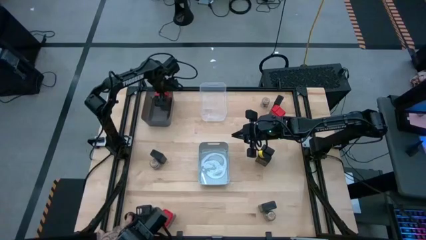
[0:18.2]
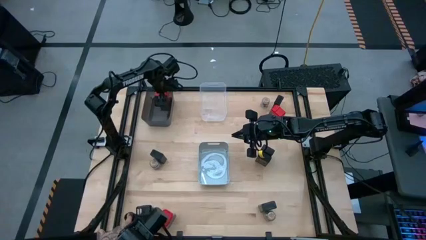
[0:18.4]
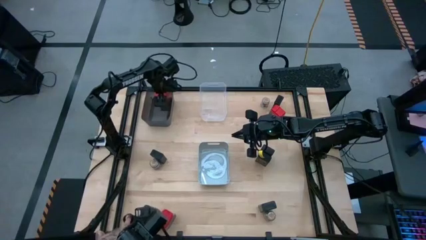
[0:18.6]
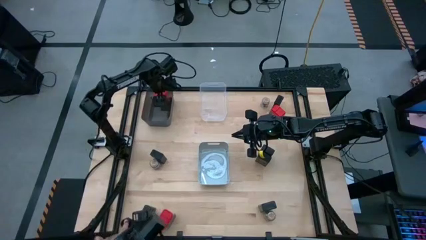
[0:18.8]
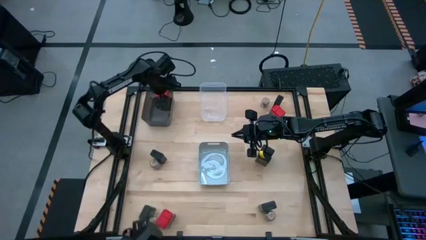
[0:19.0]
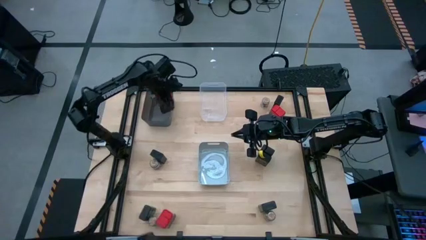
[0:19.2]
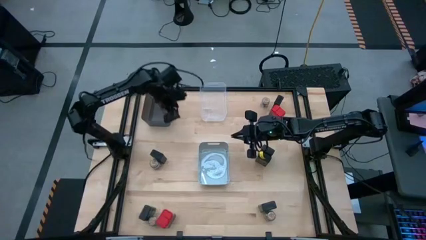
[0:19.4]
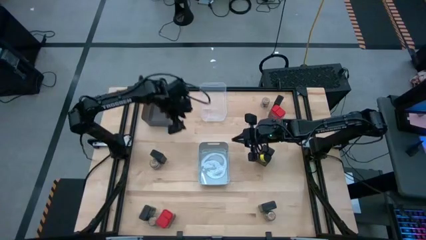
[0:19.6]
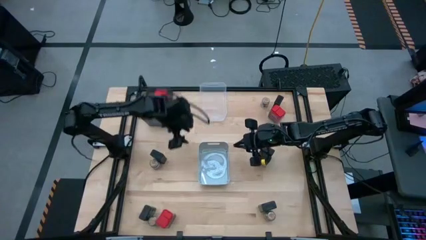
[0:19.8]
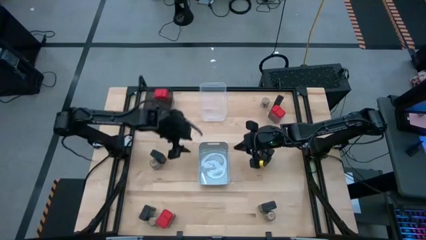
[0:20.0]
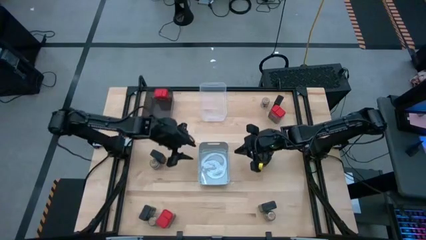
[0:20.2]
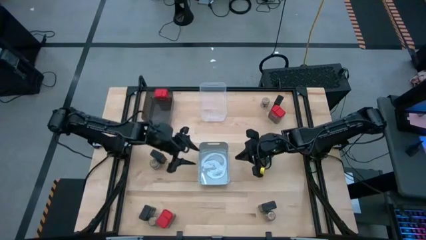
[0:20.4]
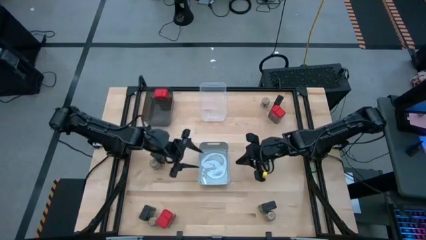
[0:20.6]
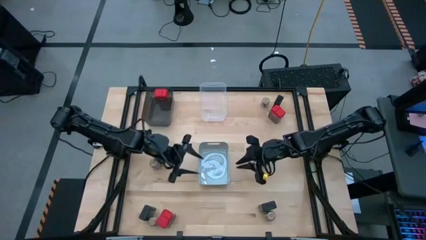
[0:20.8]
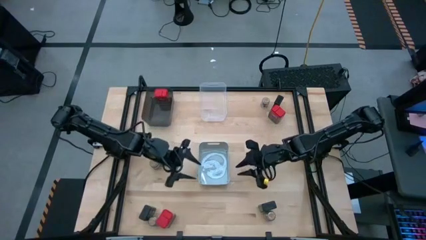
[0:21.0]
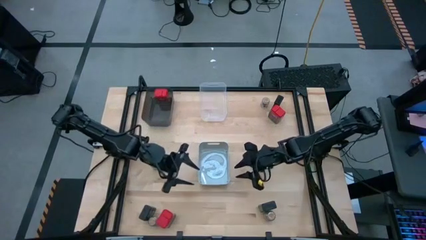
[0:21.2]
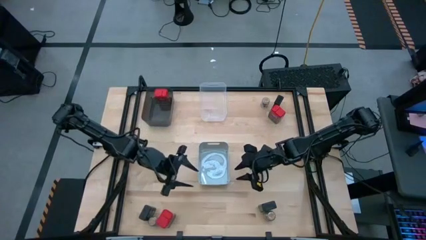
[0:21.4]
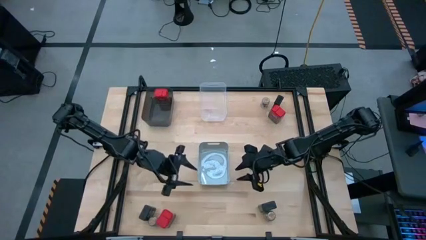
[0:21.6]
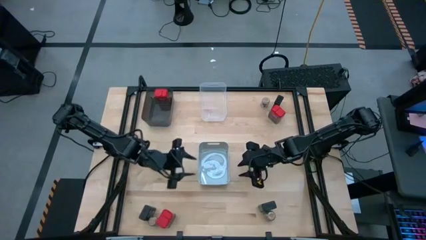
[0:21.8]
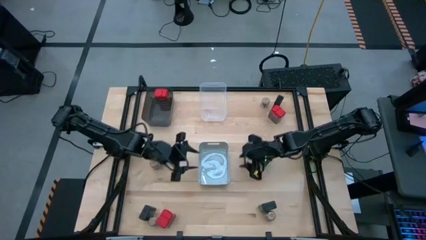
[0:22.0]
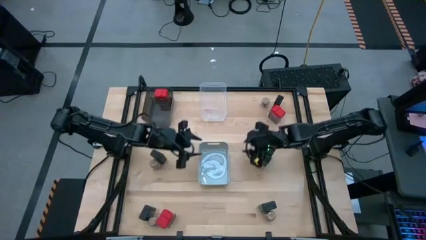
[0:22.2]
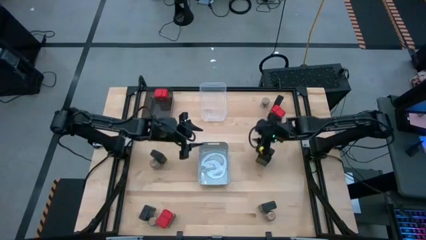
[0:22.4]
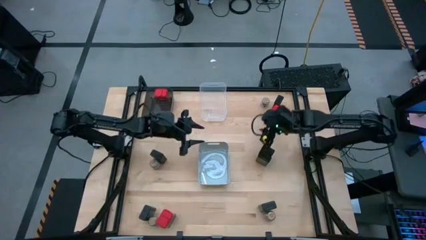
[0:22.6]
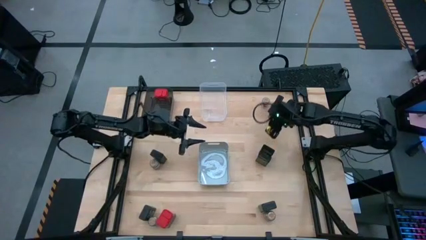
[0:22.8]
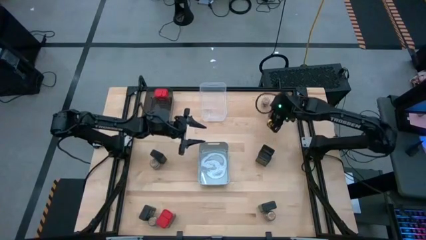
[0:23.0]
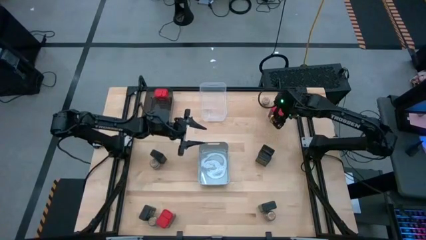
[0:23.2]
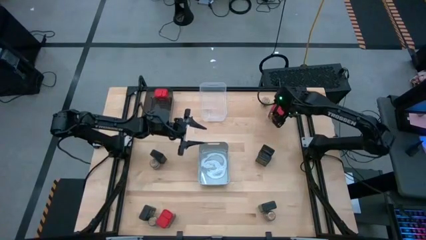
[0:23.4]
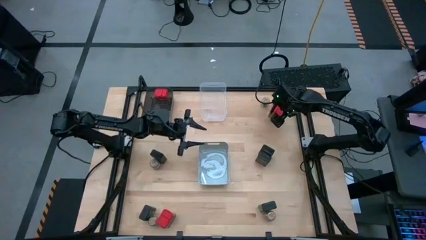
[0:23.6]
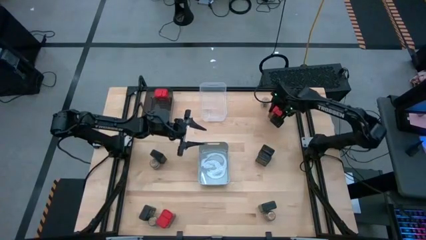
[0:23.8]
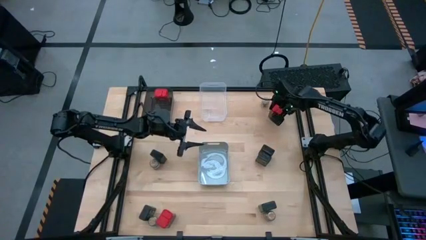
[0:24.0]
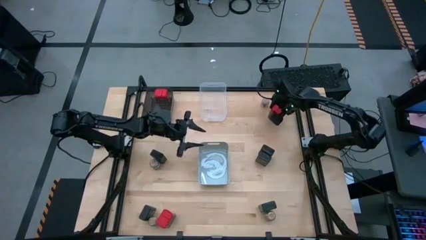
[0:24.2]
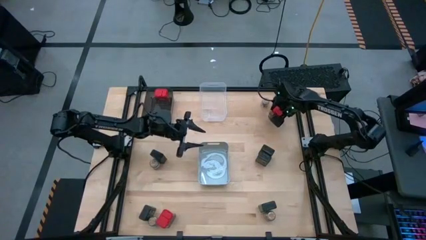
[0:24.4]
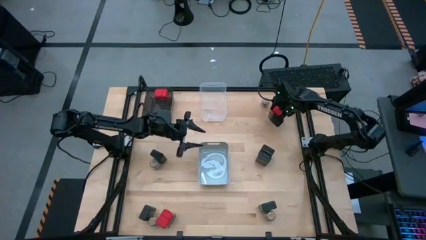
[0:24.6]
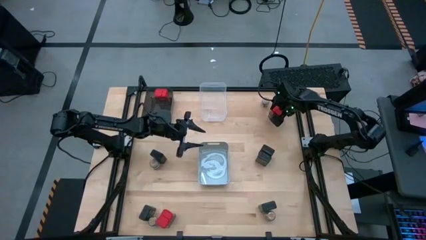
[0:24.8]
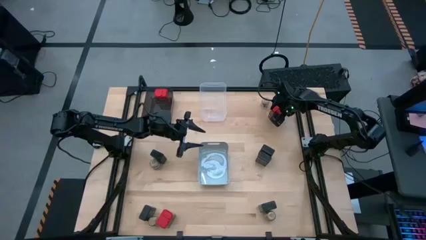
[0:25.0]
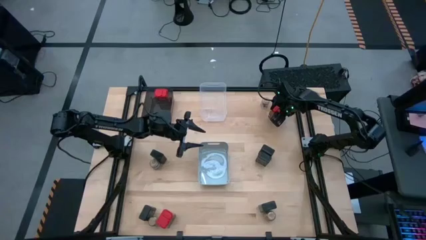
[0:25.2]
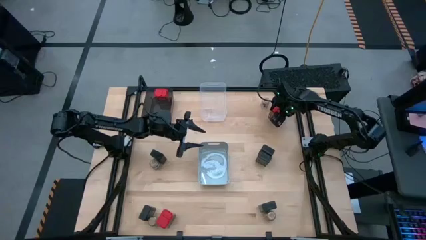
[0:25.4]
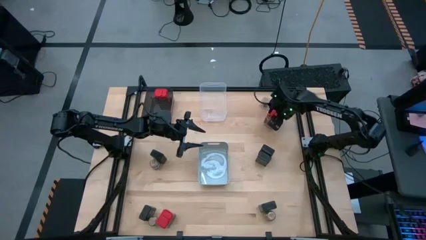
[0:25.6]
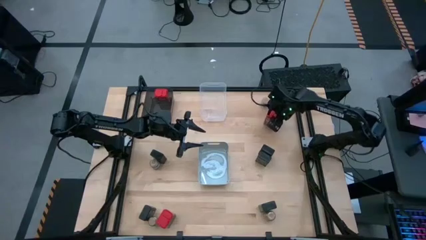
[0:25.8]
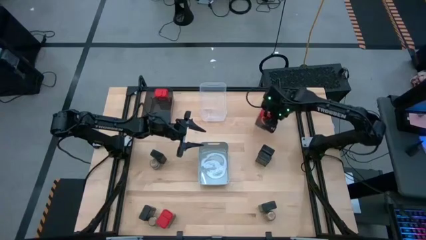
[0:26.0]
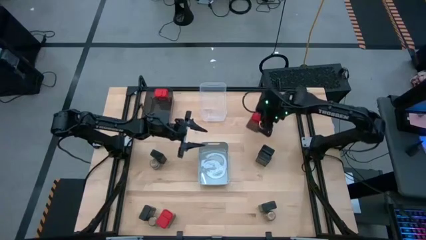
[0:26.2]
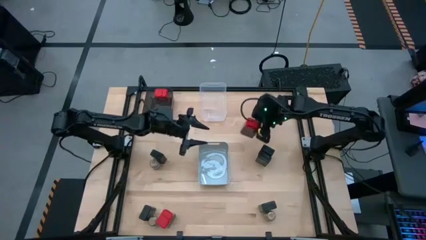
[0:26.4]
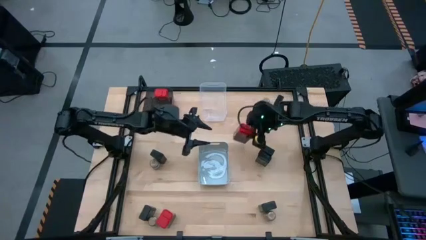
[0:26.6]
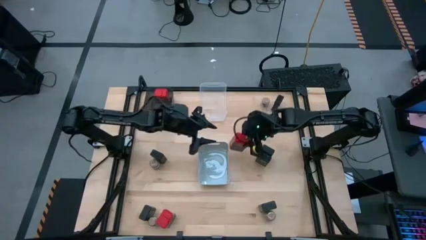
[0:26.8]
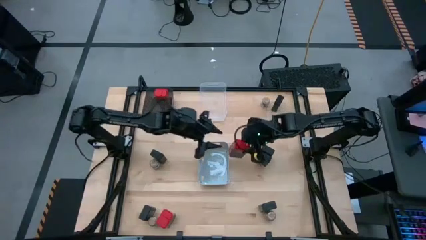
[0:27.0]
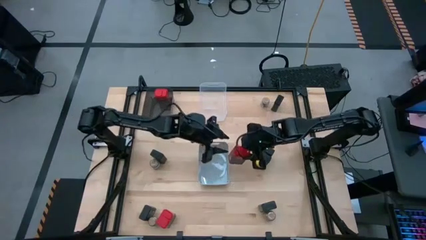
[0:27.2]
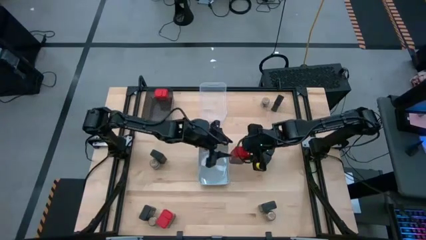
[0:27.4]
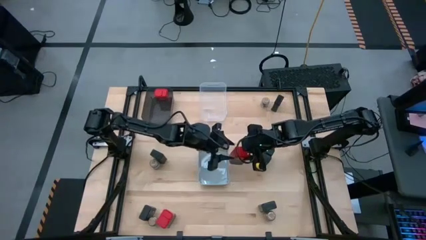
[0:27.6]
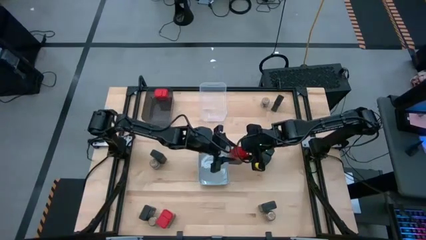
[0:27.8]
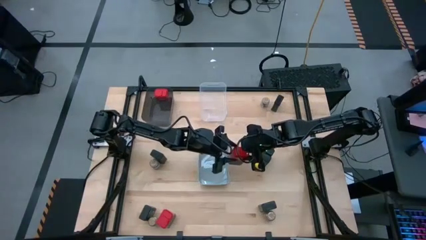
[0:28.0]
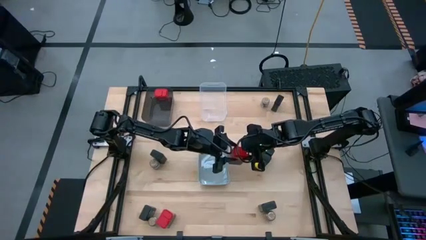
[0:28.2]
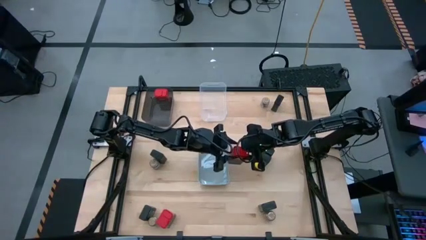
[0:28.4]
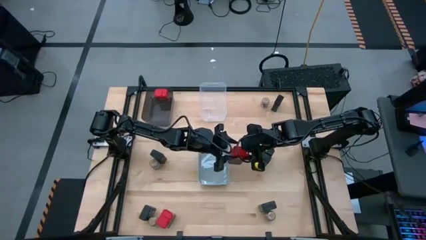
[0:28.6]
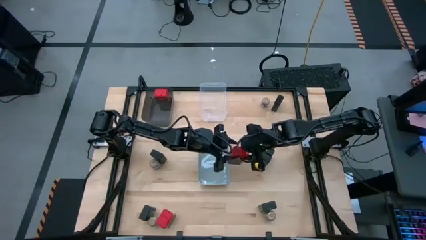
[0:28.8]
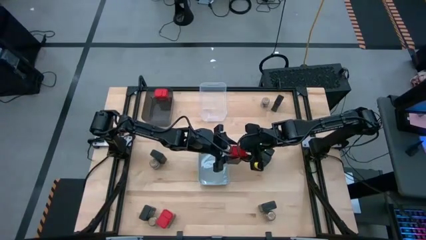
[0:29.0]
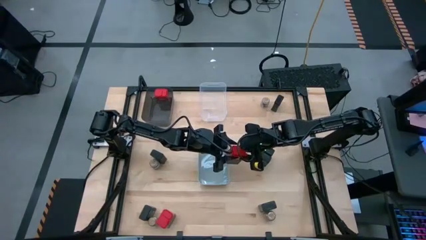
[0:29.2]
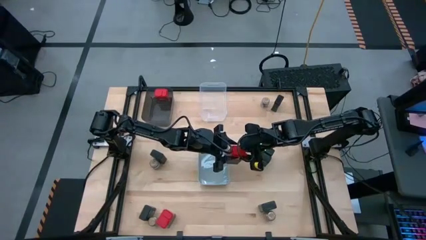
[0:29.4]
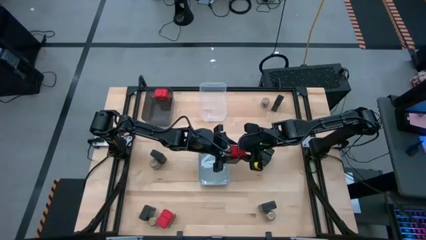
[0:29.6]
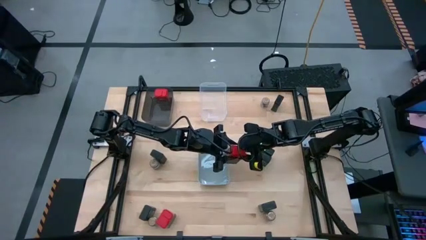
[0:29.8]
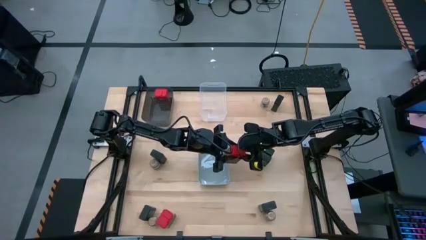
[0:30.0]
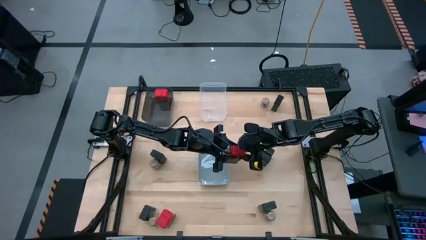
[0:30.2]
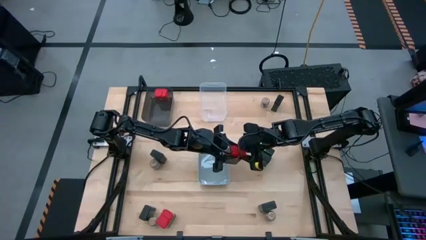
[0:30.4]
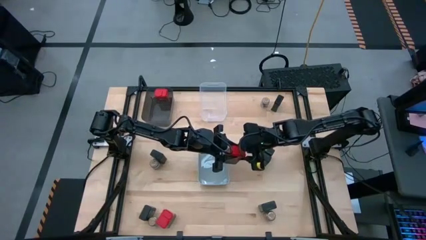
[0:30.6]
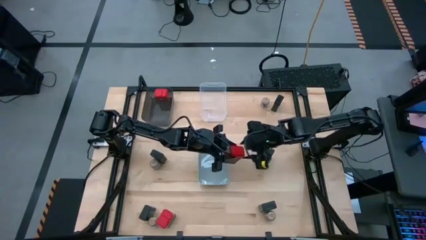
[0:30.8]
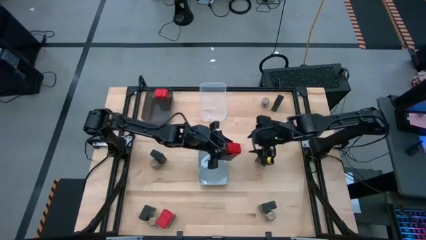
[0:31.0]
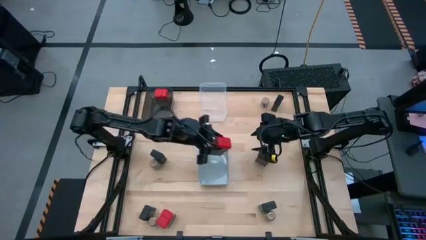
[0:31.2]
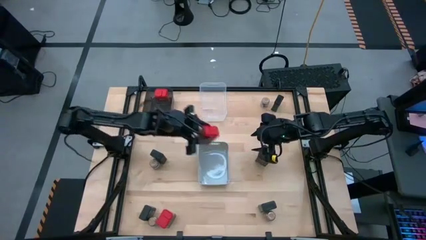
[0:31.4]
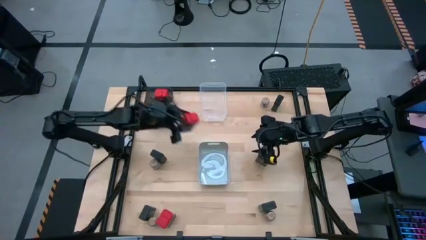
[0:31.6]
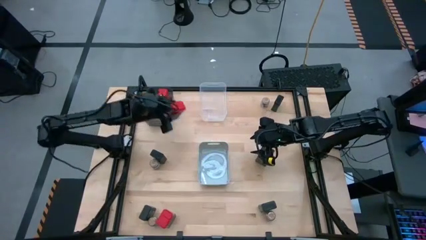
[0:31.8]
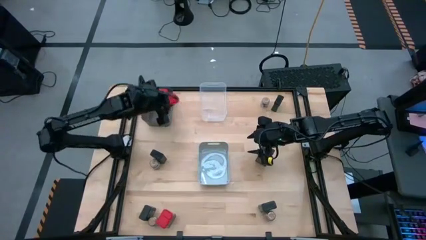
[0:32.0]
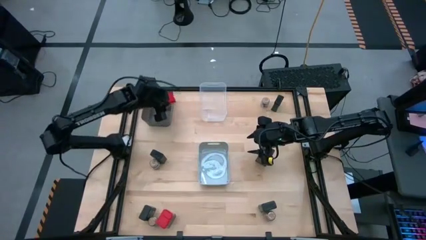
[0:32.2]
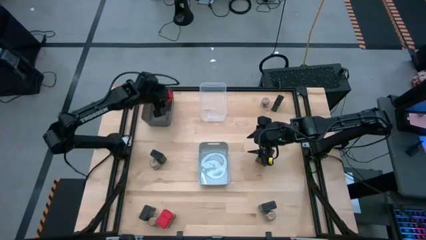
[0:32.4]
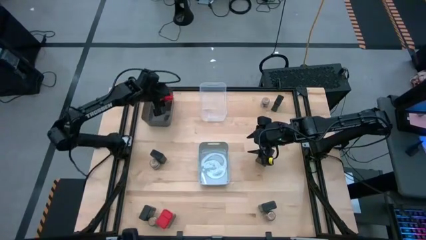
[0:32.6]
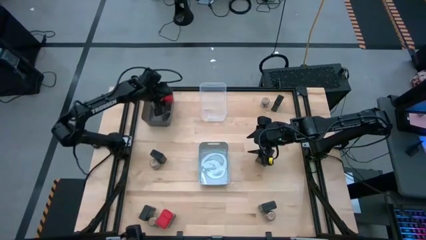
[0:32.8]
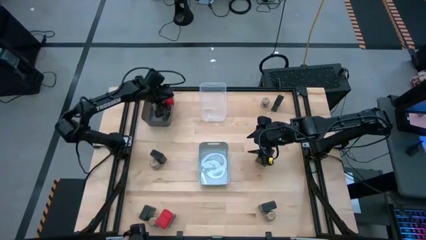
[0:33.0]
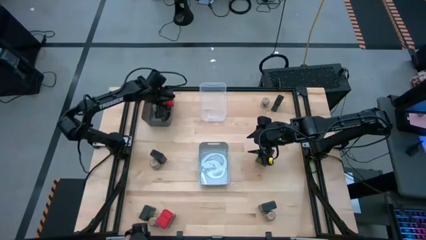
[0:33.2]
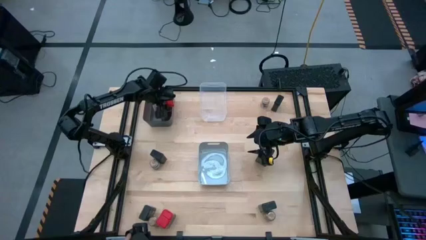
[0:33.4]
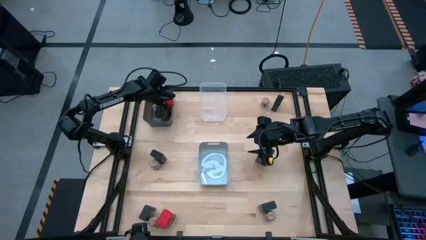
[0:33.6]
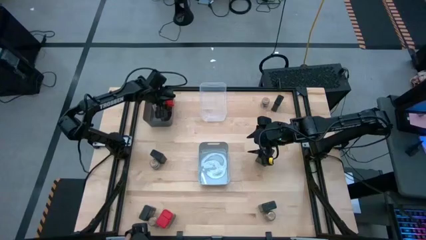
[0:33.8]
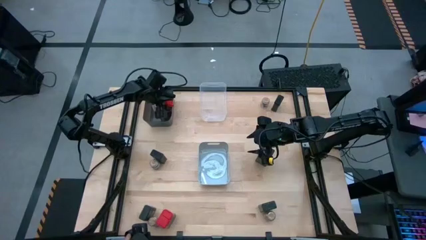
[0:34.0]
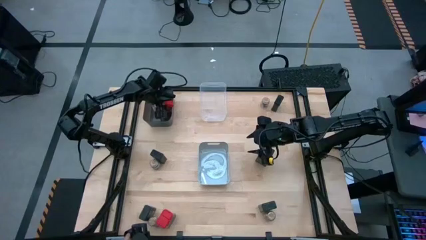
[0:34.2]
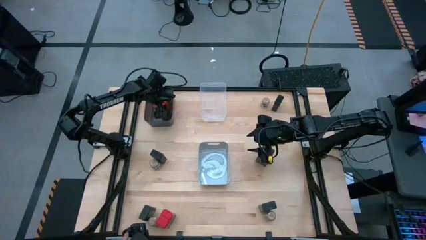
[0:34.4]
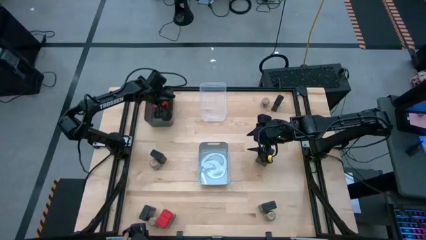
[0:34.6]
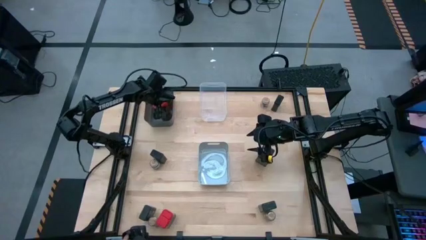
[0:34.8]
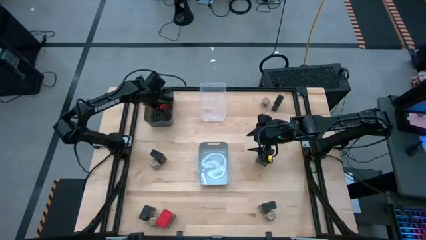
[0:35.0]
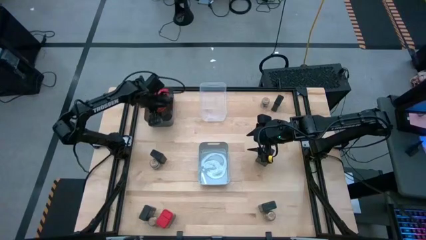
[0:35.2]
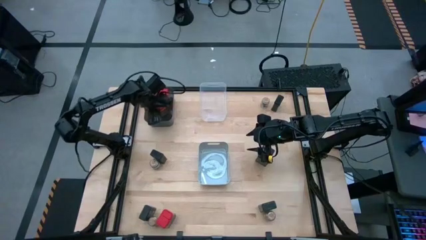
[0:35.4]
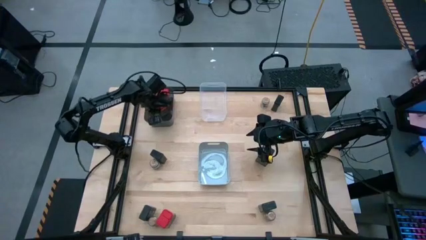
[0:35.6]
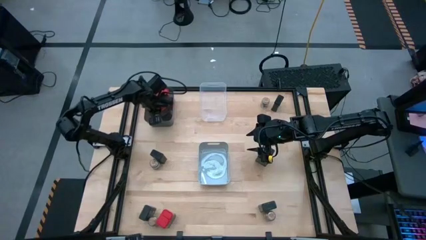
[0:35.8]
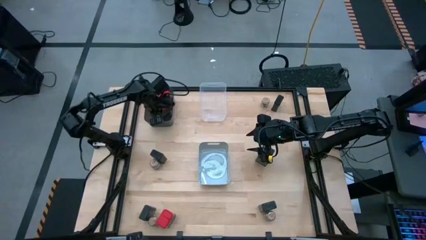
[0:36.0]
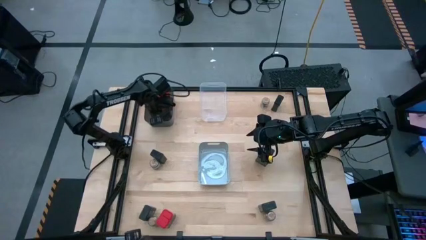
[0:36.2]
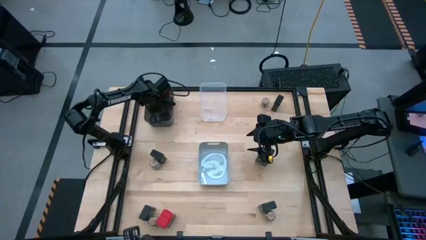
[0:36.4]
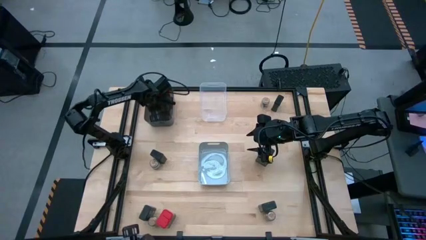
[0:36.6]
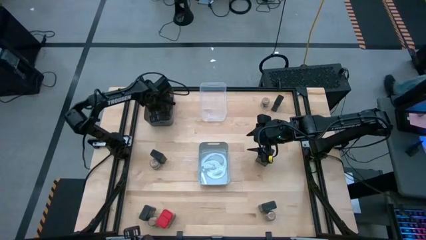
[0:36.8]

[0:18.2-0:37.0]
Task: Sort spices by type
Put the red seasoning can into the black transparent bin
